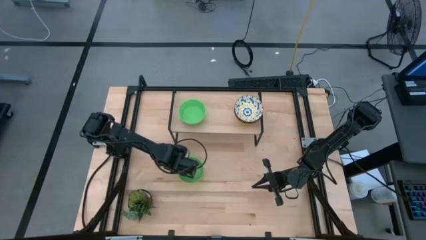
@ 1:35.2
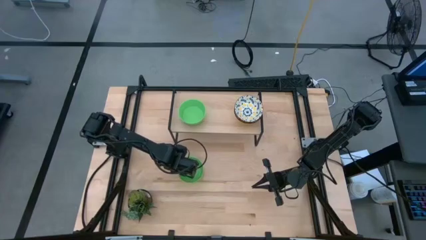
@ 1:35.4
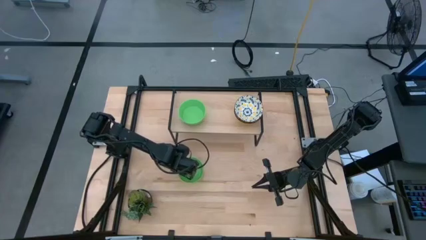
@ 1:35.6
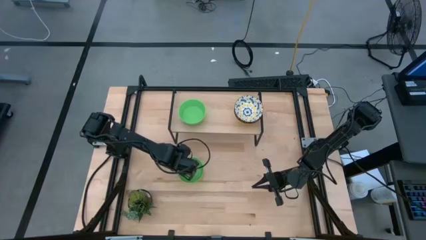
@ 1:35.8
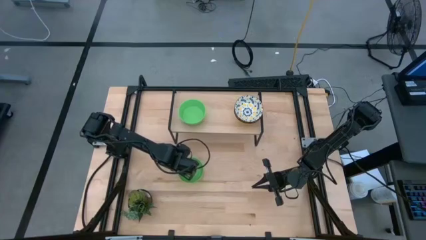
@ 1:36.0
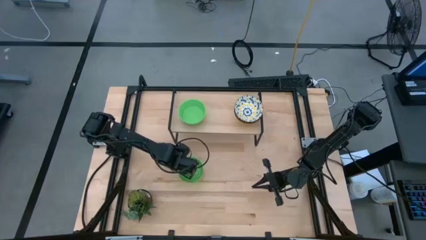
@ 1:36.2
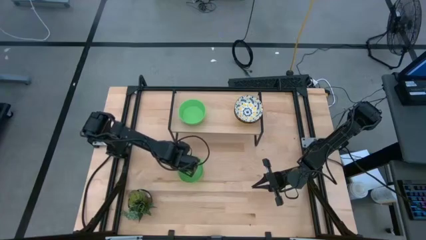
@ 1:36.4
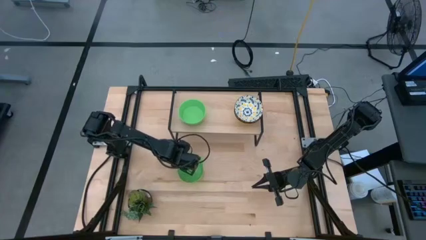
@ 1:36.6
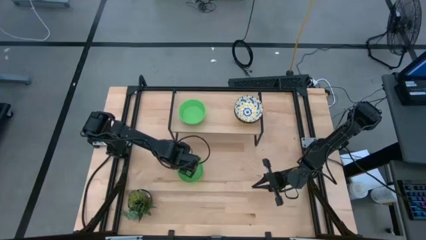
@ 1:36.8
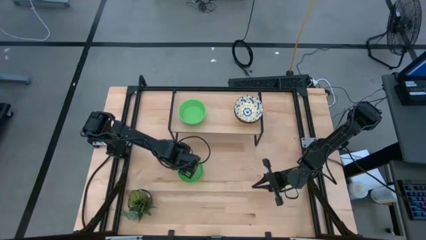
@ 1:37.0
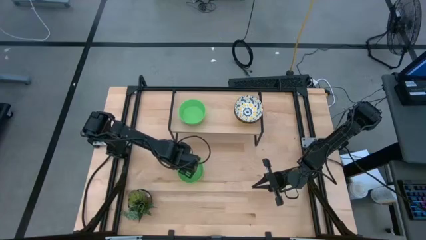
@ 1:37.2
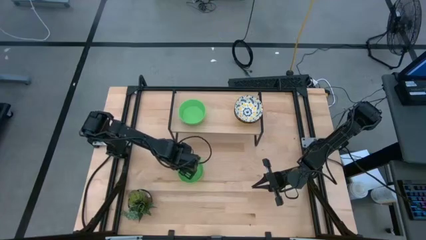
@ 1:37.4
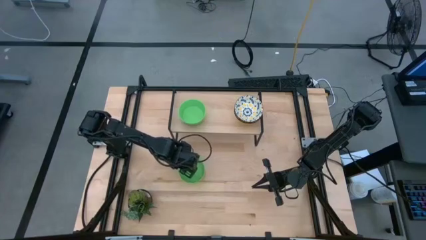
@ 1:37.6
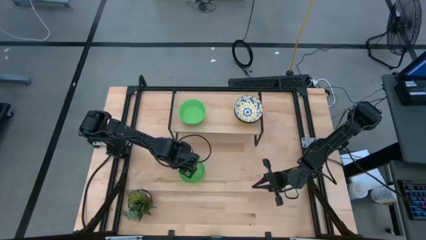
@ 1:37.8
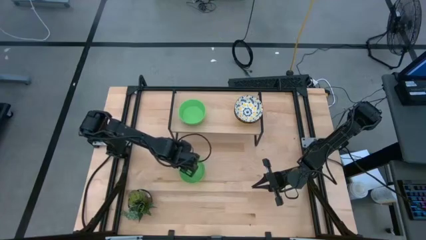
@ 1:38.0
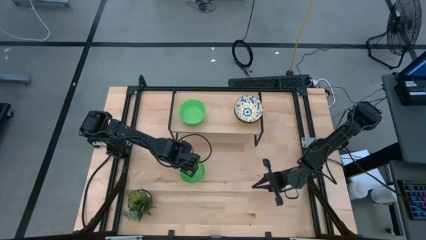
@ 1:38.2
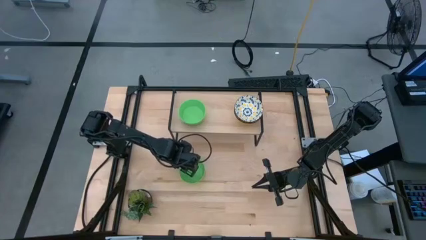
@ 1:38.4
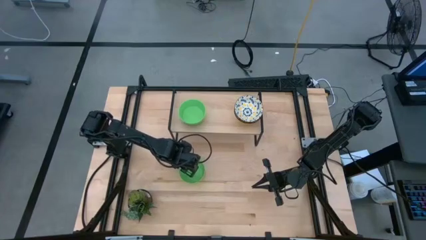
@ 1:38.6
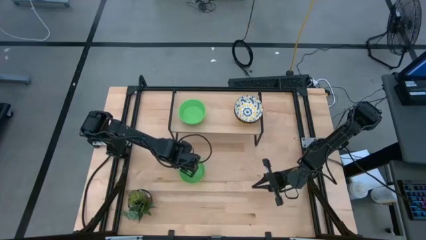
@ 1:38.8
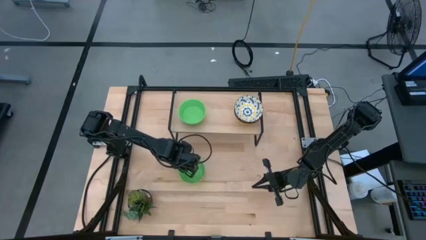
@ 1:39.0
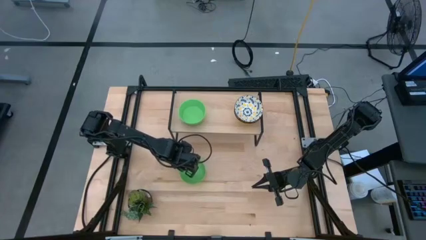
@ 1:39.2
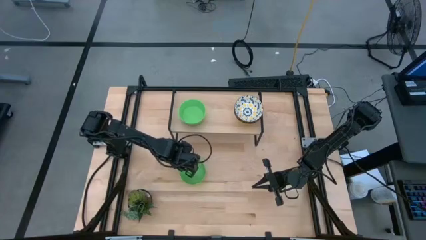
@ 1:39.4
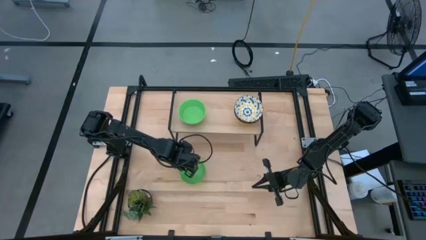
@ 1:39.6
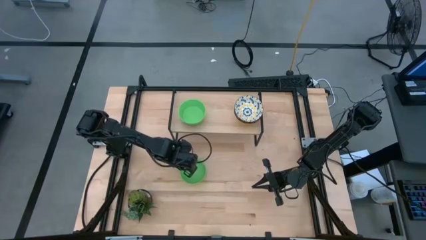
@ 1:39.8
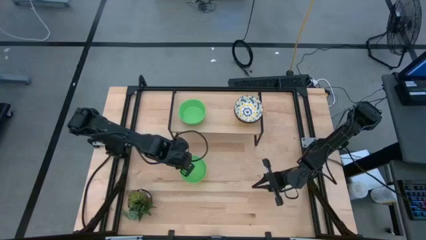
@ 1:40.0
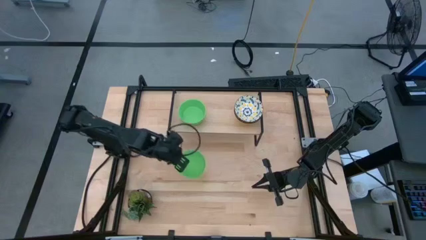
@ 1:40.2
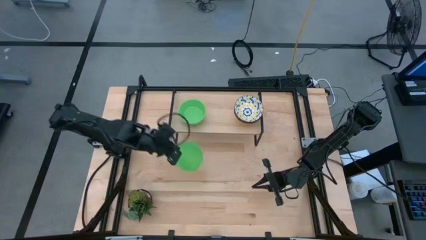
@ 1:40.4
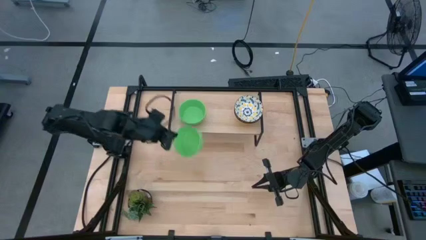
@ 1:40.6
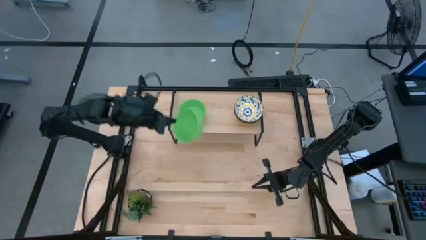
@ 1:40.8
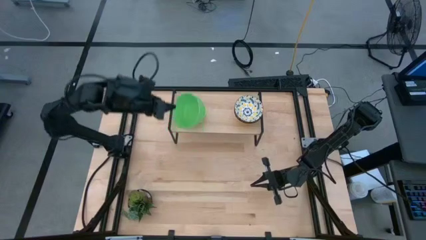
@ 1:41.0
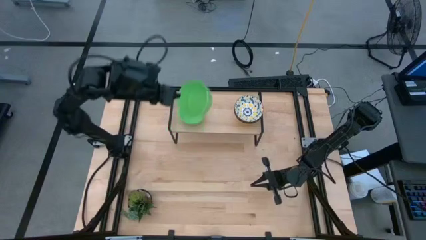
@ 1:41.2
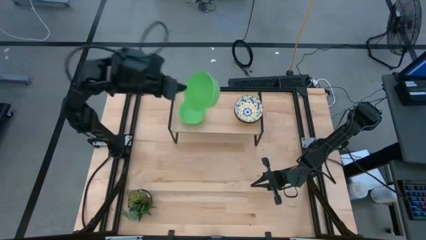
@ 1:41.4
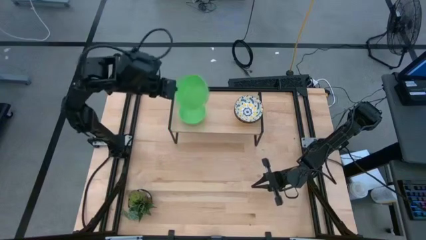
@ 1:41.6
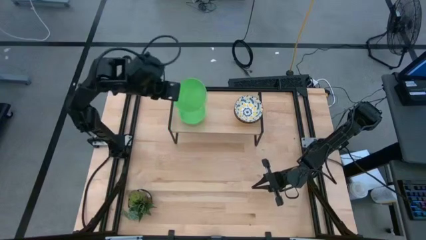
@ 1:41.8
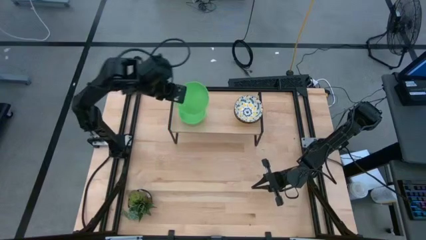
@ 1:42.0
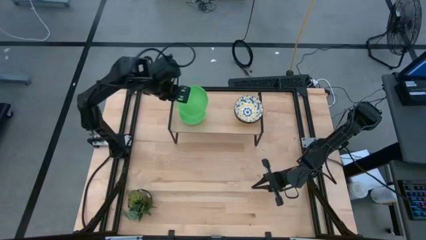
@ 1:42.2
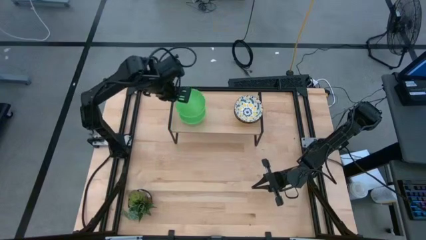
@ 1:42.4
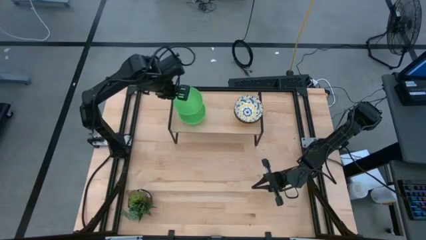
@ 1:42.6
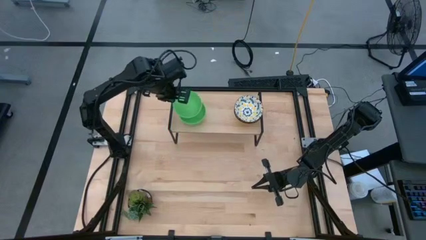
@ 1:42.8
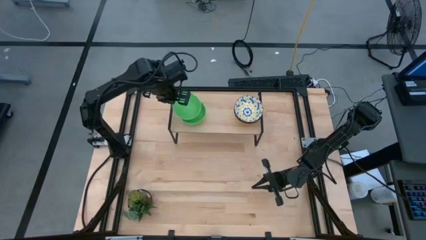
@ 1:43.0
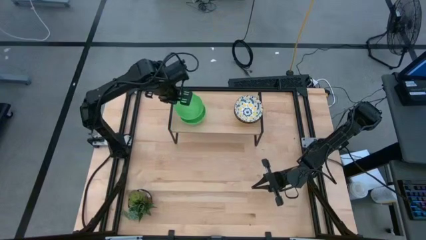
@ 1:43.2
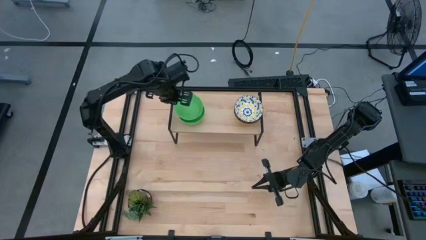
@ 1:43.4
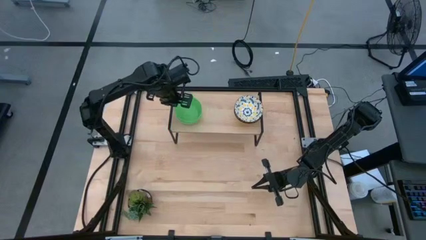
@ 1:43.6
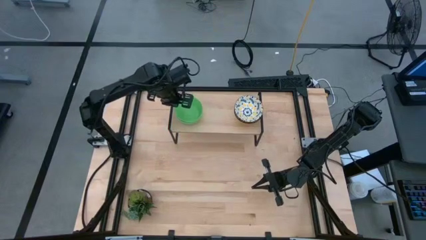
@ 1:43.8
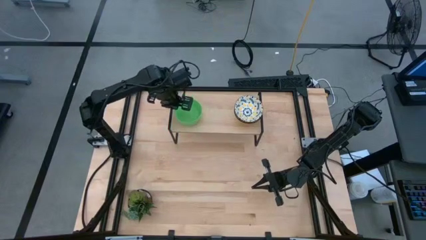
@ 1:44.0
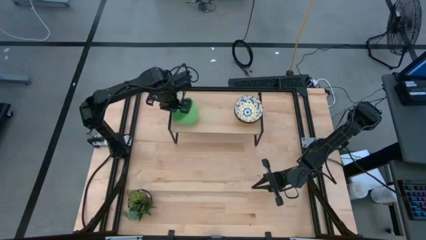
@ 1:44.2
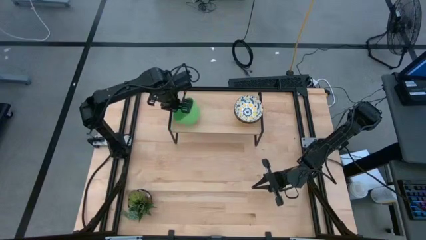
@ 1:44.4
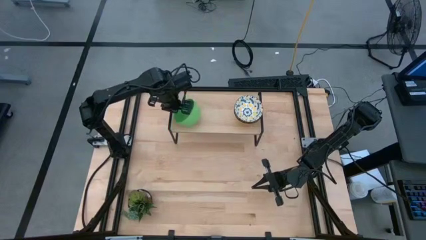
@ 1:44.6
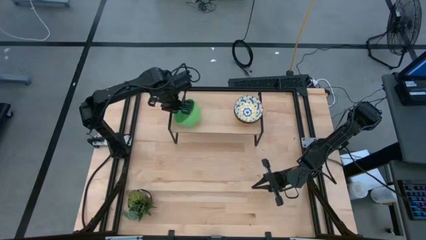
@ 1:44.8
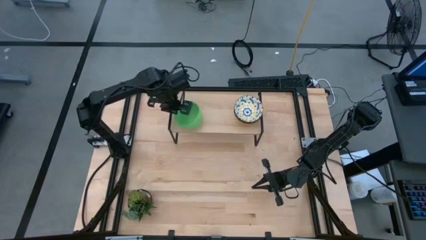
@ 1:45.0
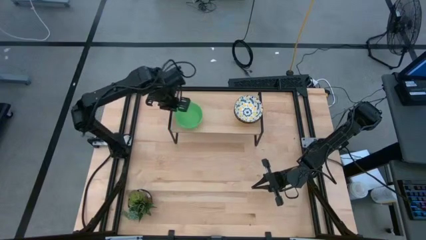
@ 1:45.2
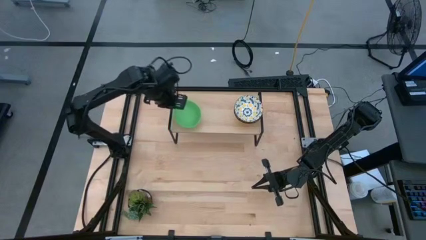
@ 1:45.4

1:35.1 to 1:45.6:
Task: Pick & Place Mini bowls
Stack the green bowl on top of the green bowl on the shelf

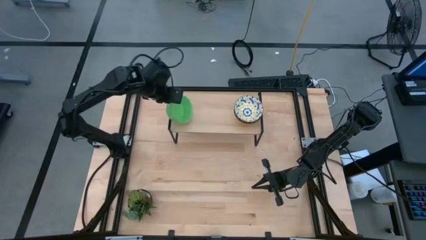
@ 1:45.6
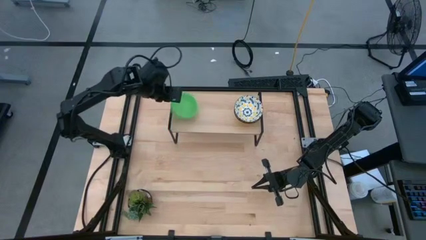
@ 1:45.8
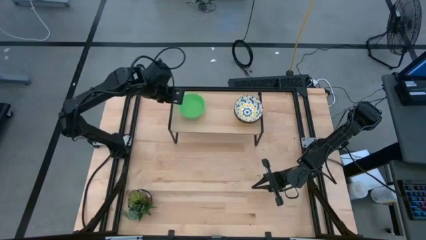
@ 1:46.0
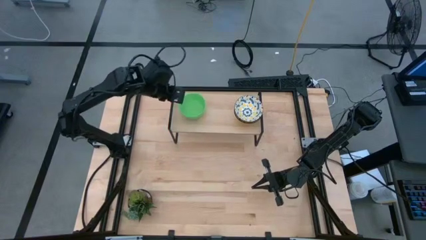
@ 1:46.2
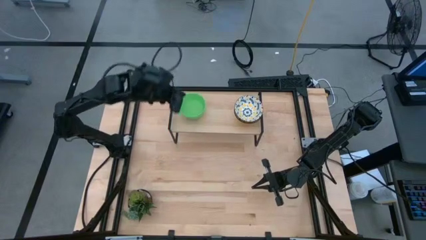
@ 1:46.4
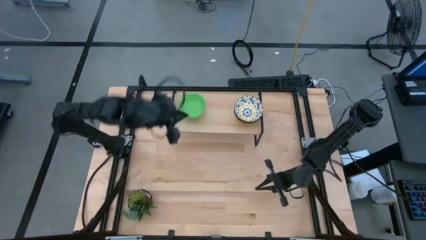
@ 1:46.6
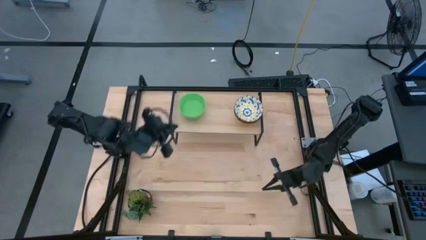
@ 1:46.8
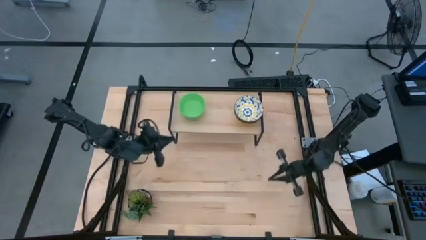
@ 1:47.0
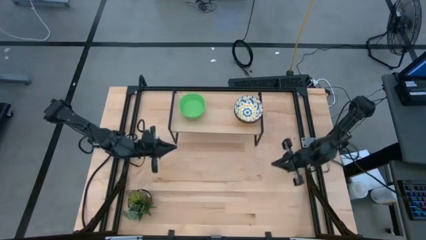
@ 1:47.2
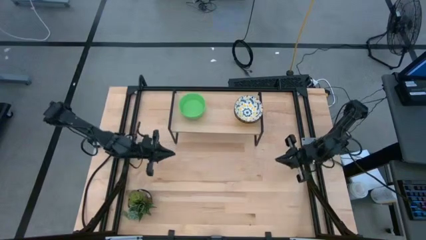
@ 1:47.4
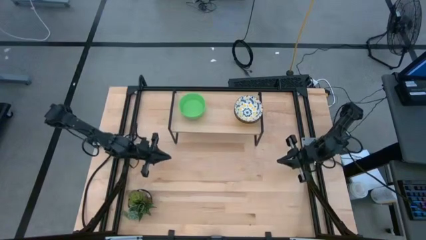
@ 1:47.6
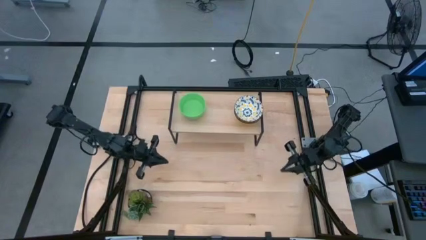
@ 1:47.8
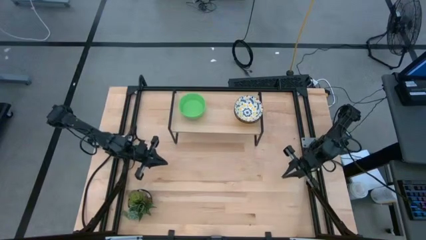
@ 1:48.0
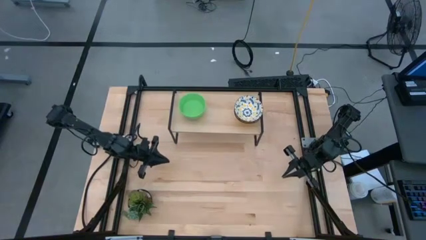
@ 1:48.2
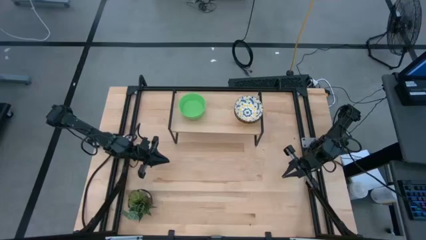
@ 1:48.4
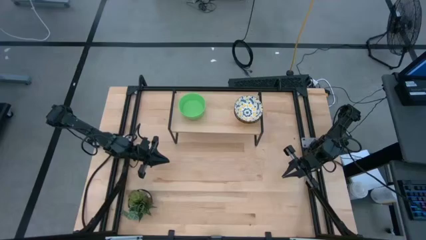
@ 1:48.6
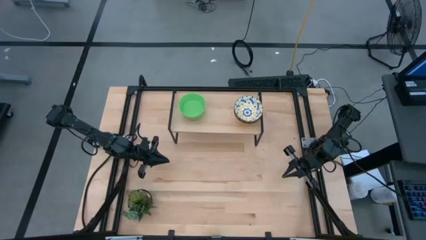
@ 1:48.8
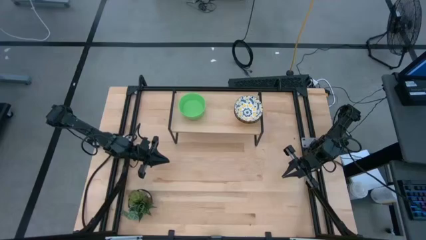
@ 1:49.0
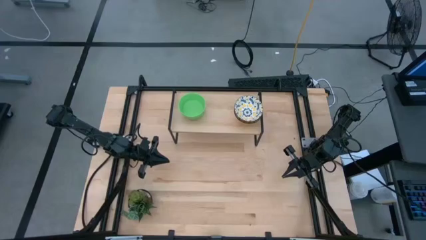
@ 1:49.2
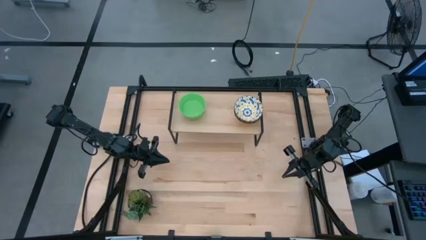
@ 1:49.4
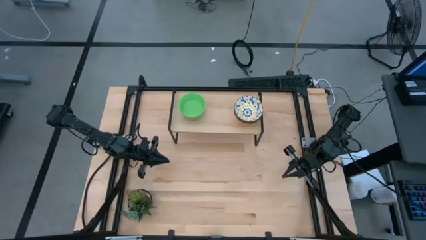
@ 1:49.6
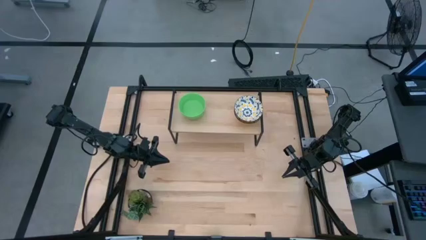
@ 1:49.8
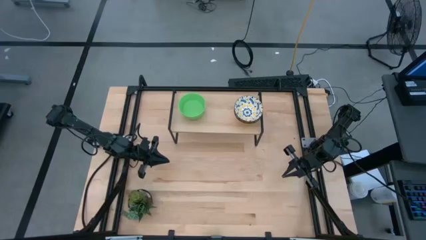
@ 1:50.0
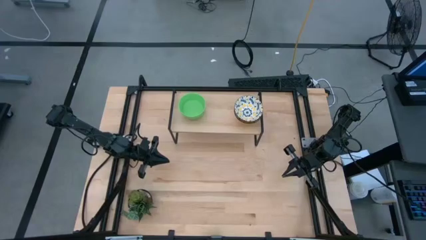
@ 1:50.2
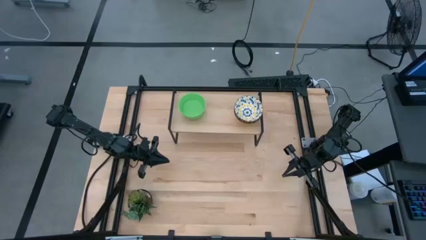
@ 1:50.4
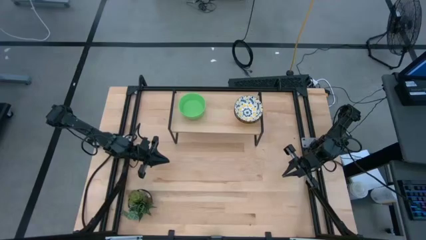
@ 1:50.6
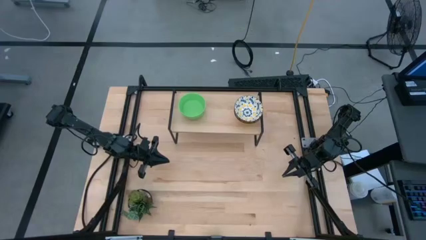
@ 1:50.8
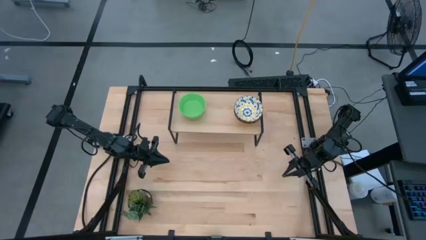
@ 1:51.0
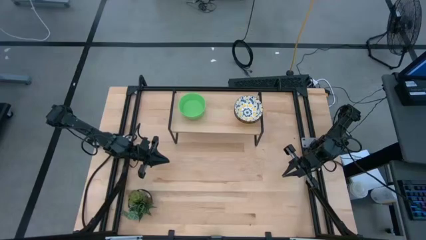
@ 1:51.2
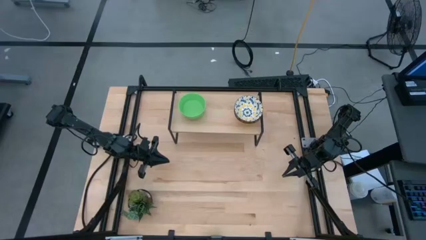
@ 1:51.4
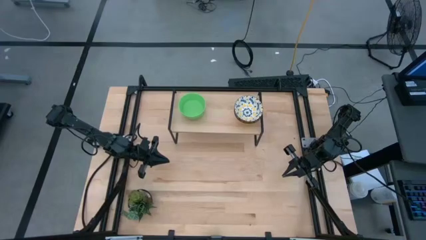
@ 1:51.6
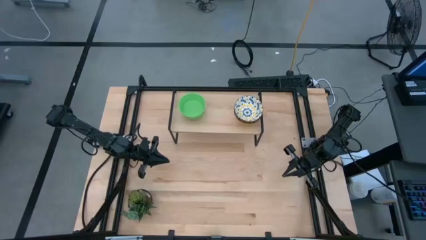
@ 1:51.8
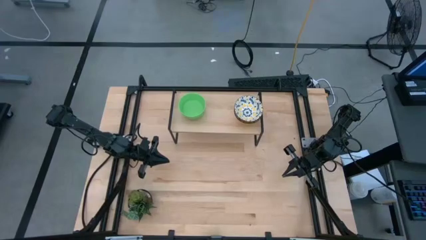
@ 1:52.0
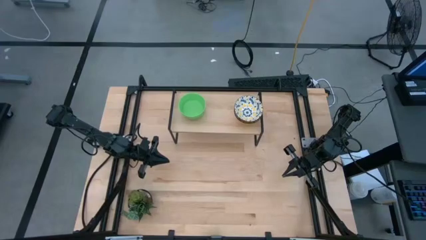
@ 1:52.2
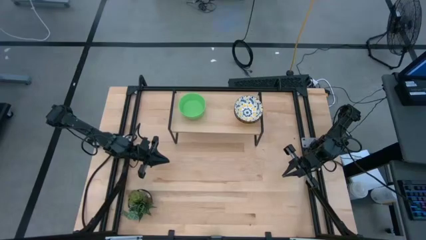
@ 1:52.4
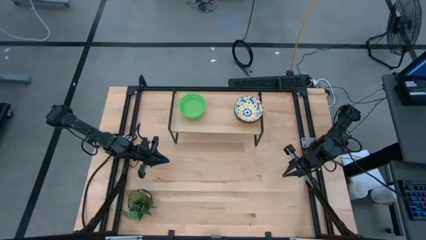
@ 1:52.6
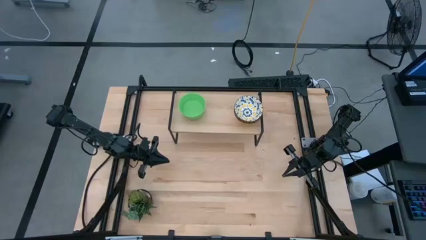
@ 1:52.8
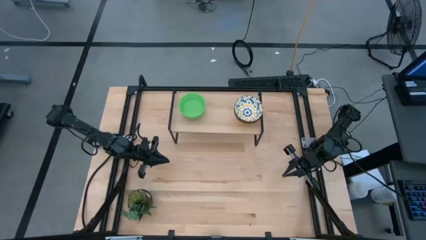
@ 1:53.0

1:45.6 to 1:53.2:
Return to Home Position
